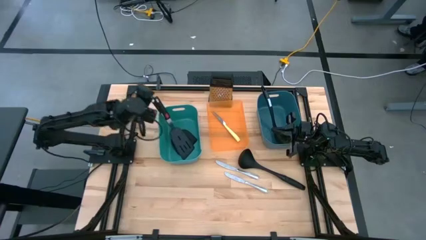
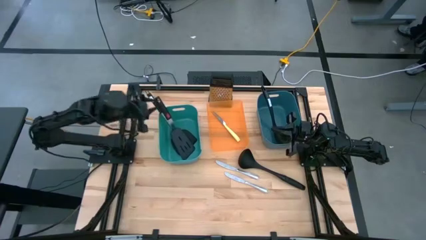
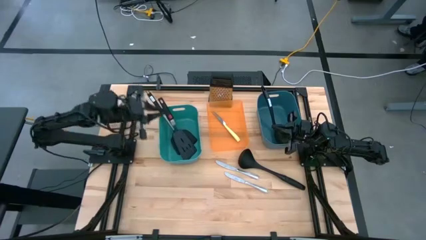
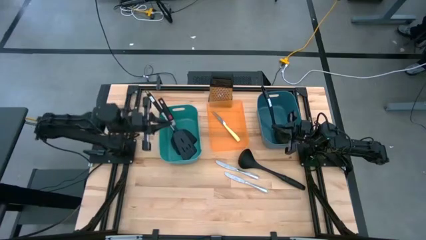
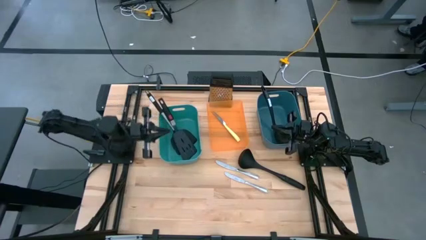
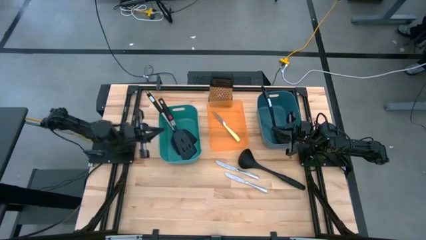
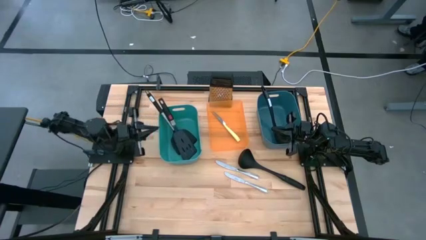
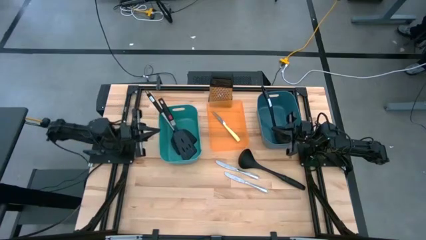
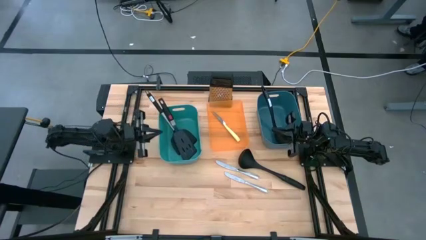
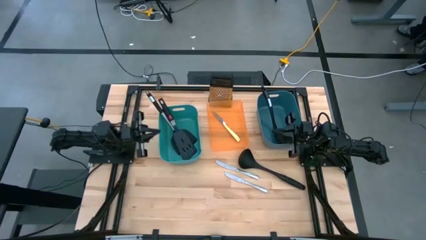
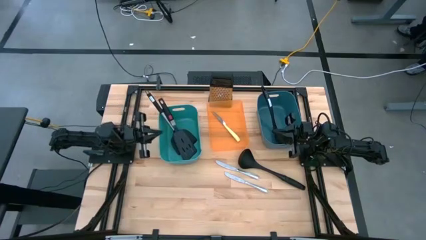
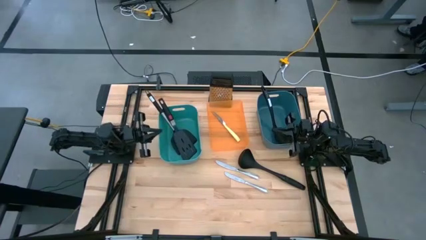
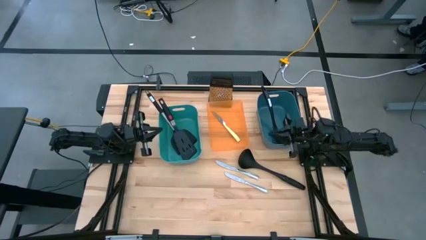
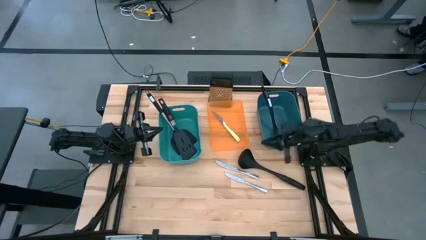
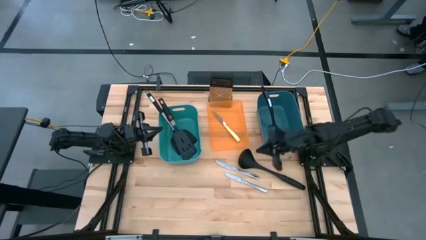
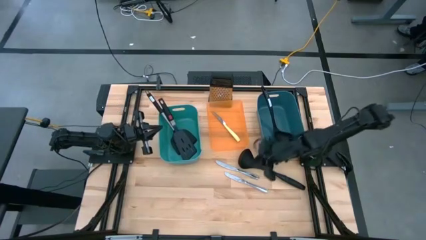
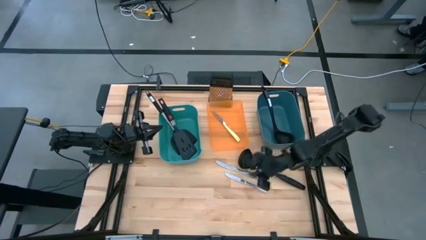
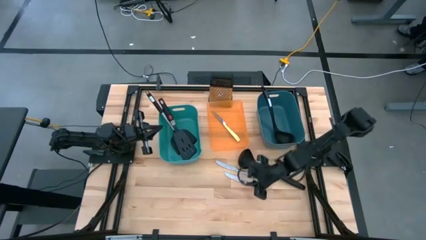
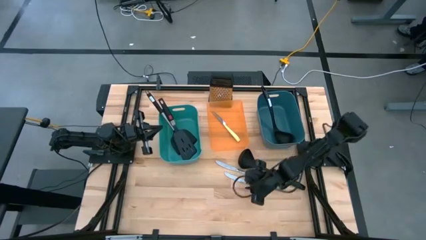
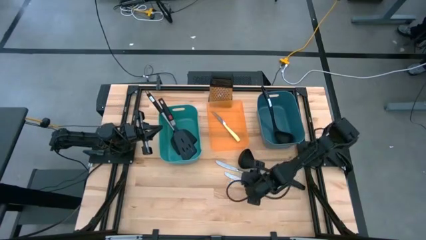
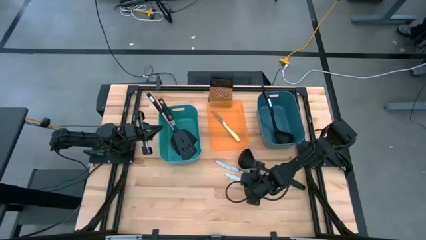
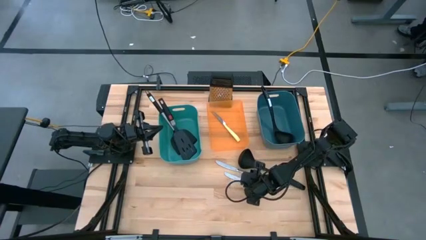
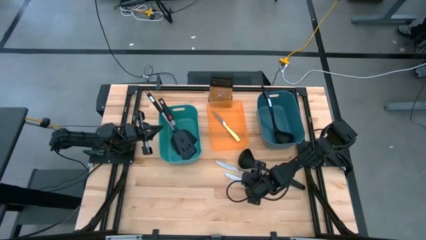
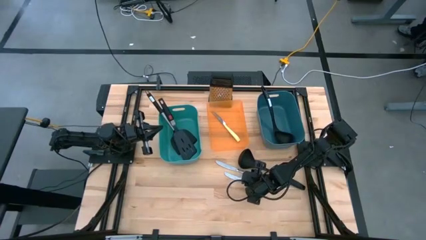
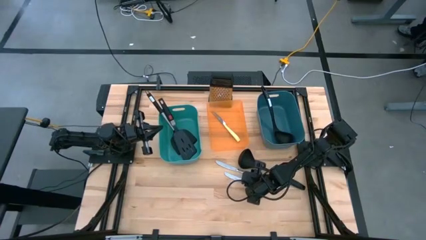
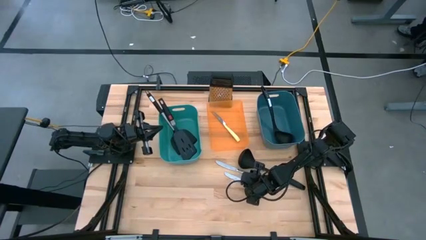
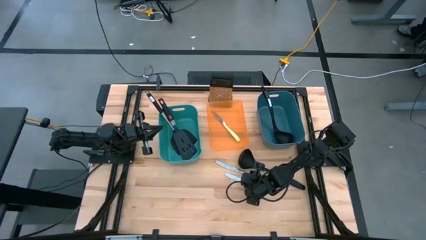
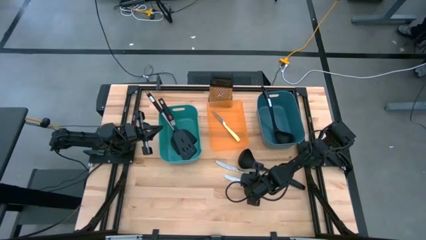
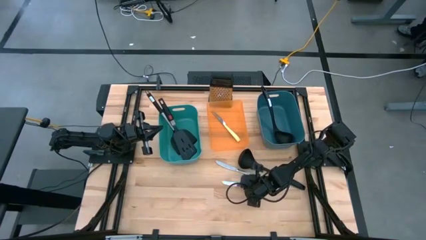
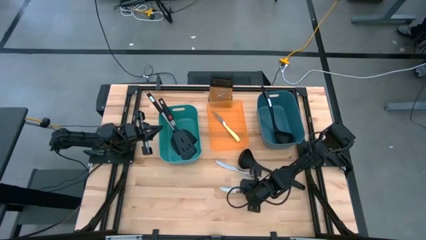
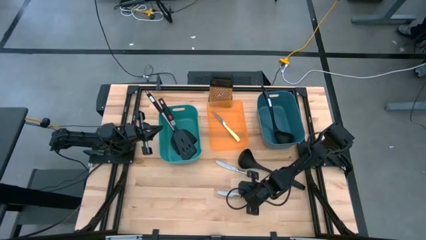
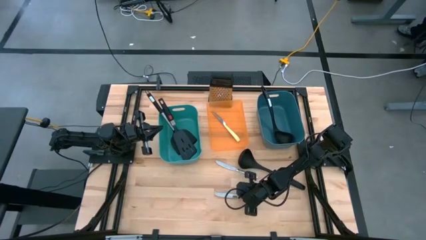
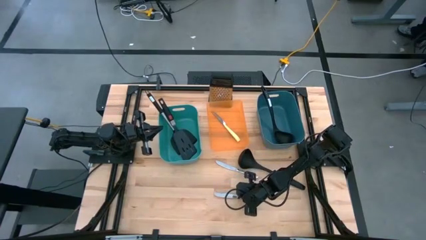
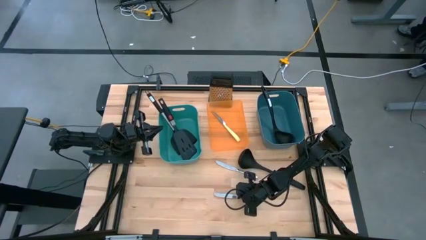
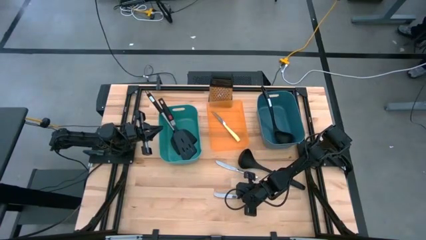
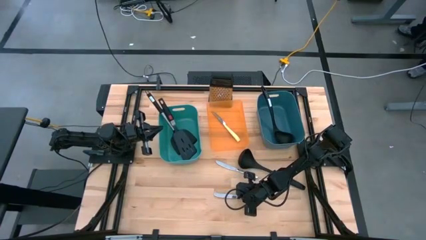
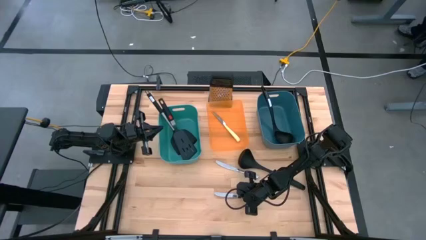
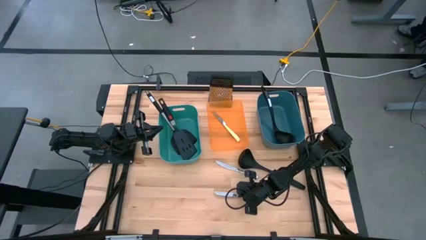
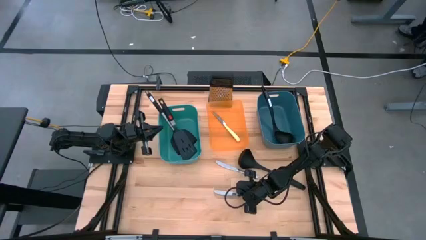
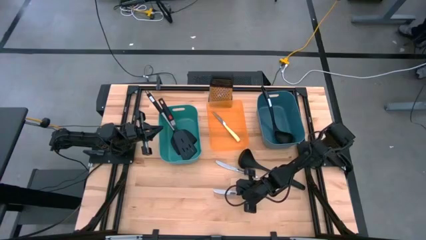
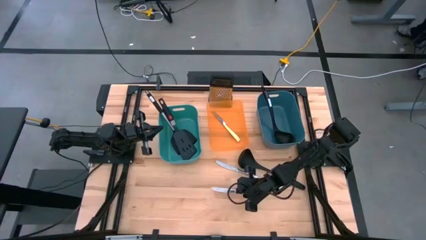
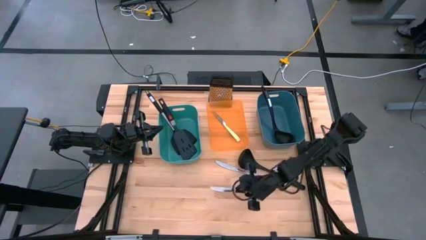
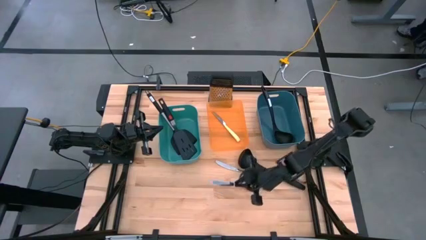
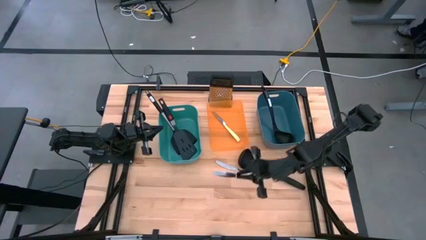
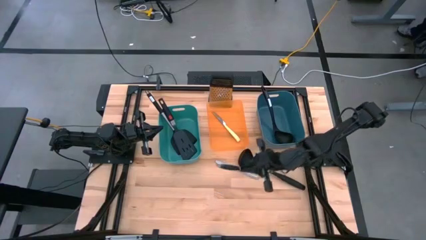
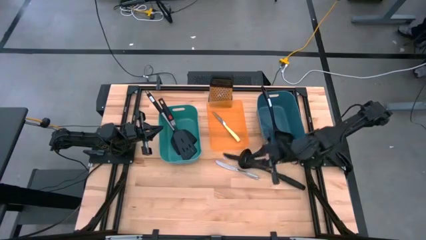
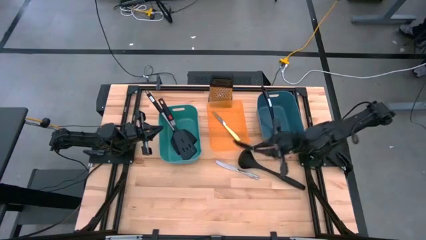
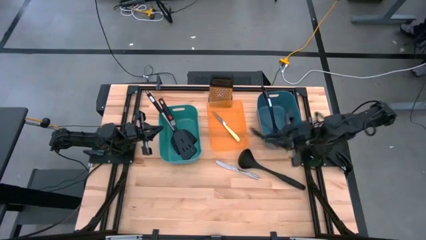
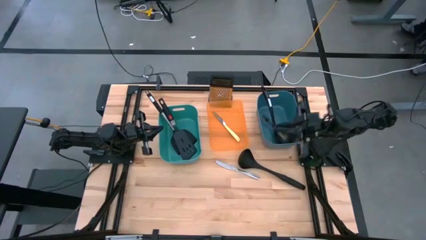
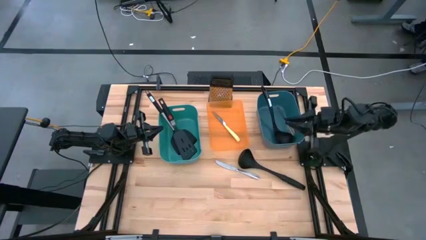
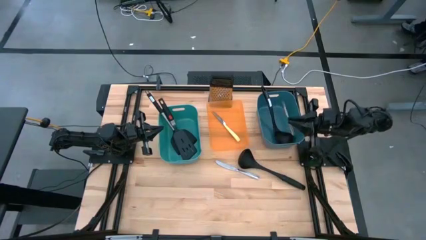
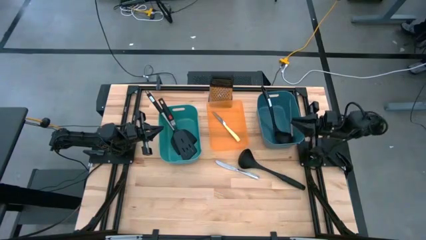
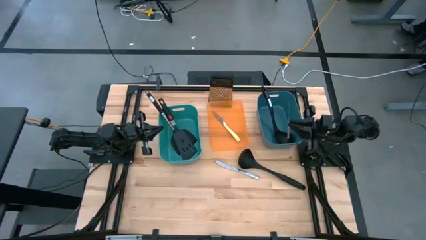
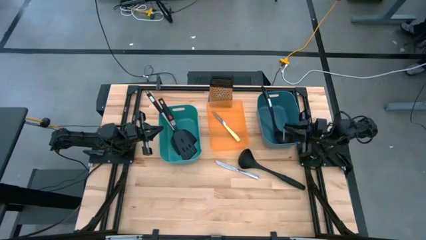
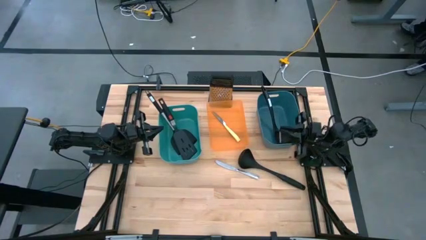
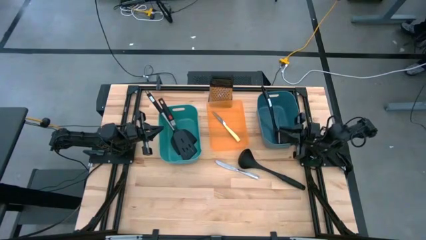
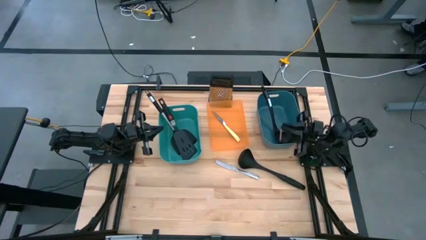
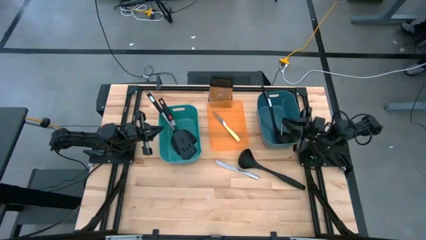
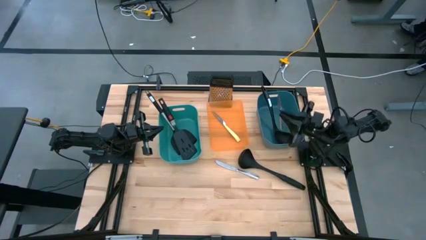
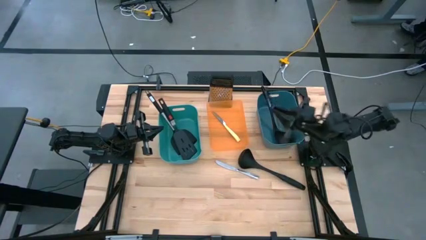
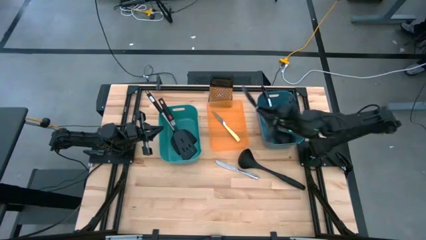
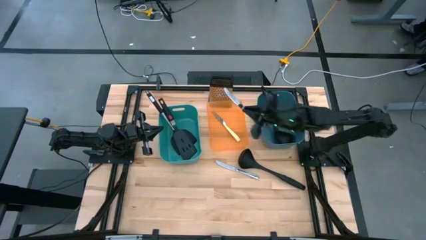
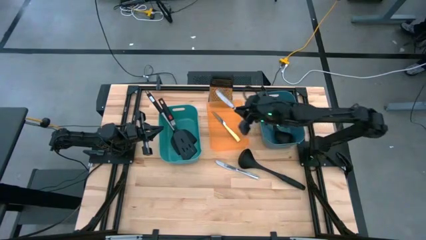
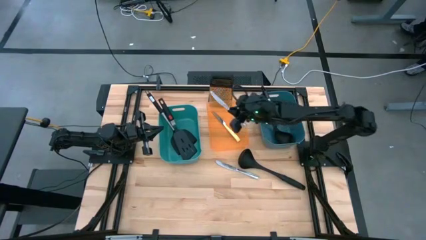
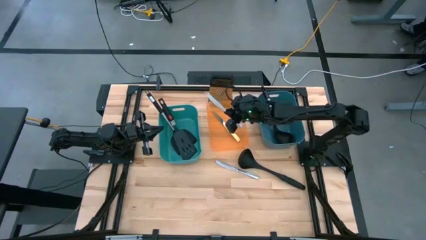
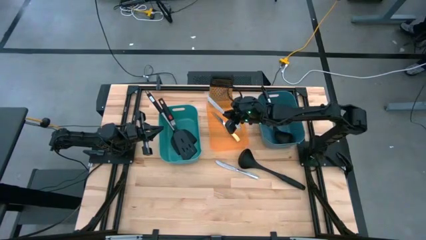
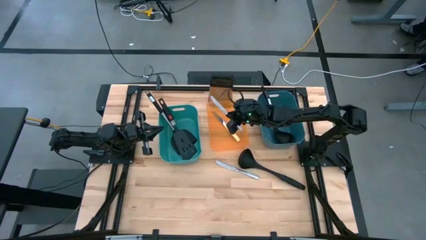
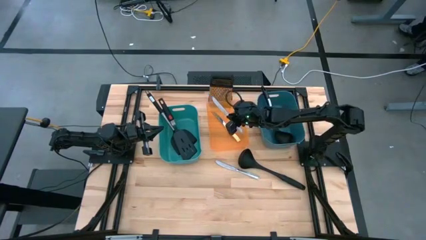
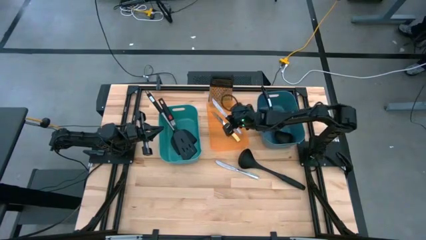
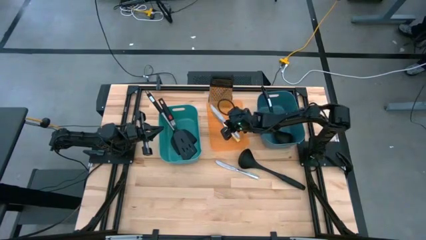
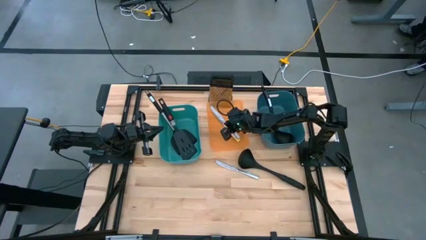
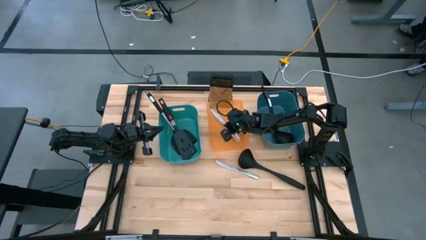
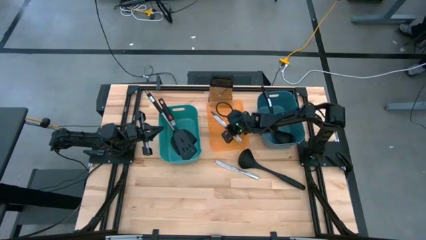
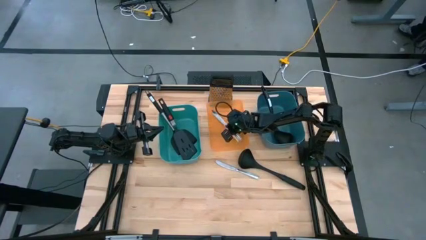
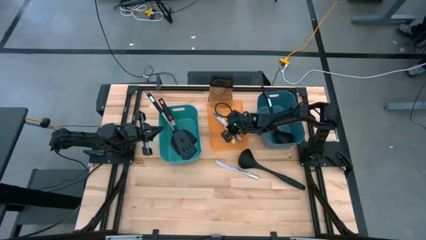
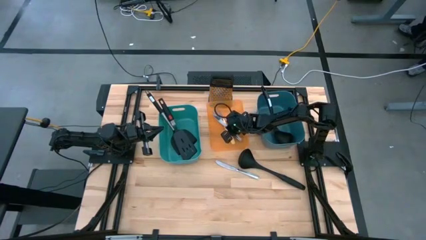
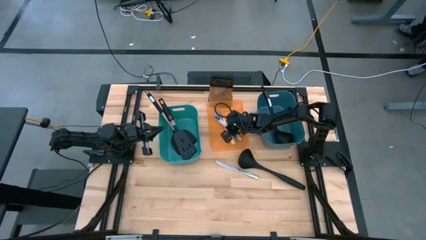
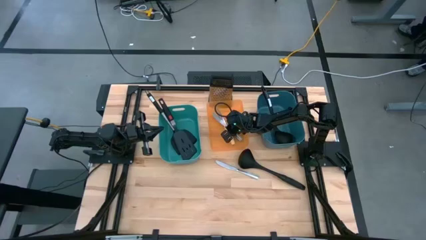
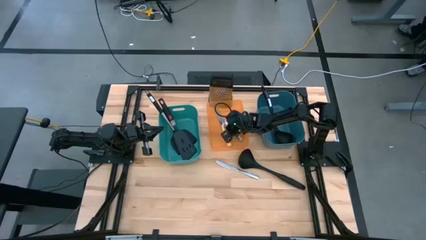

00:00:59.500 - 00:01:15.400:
Task: Pick & Place Kitchen Items
Put the silver table knife into the orange bin
